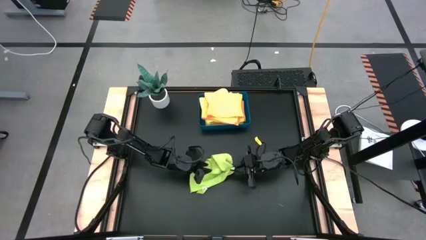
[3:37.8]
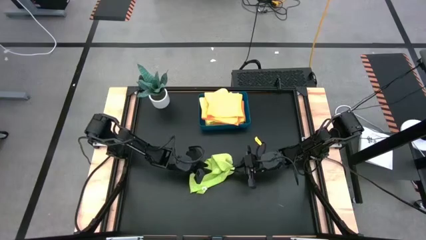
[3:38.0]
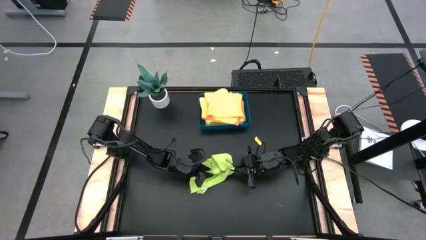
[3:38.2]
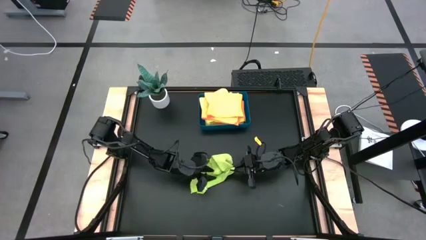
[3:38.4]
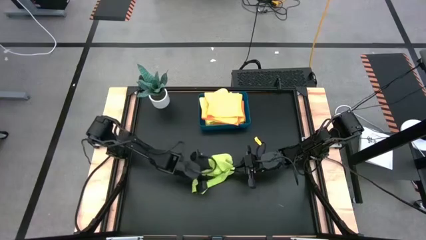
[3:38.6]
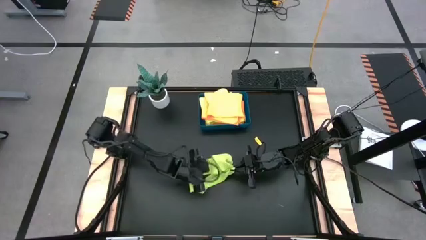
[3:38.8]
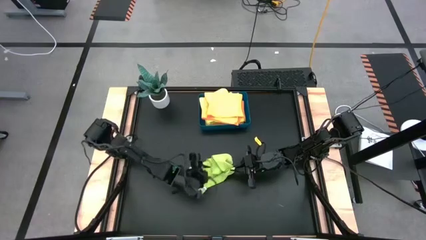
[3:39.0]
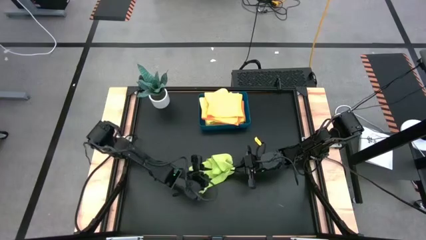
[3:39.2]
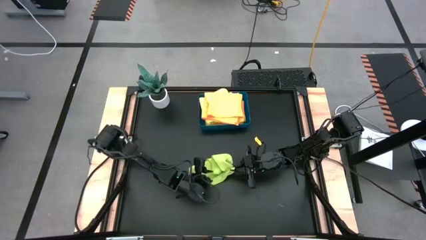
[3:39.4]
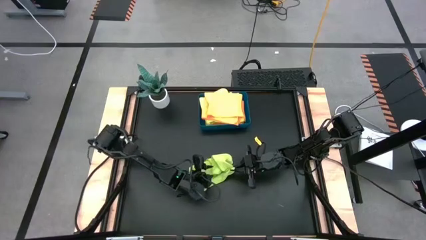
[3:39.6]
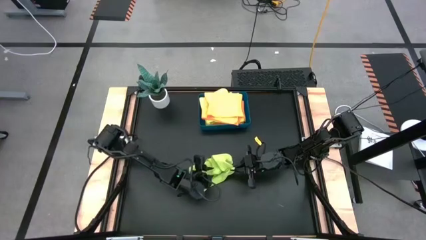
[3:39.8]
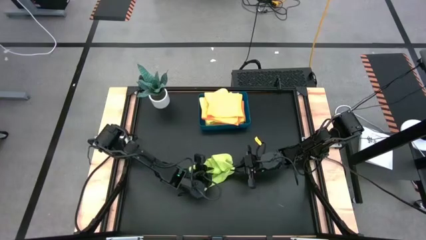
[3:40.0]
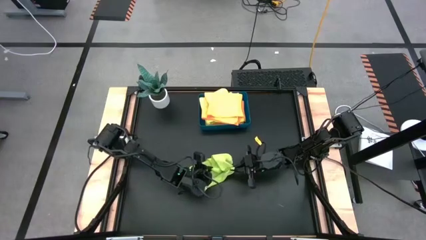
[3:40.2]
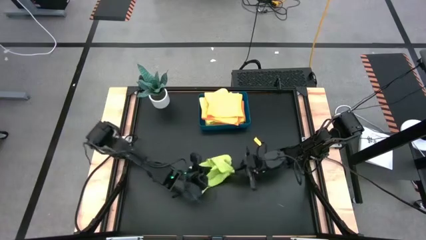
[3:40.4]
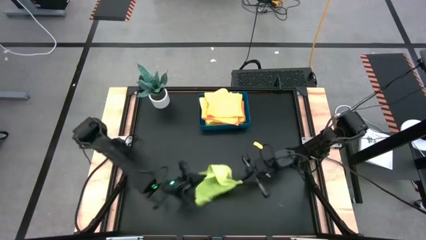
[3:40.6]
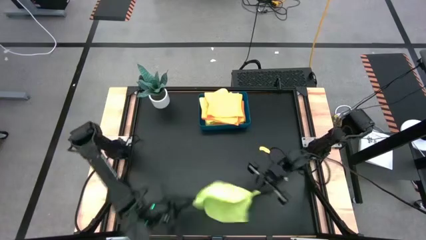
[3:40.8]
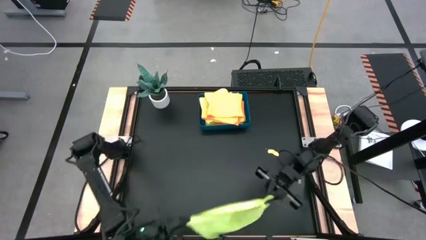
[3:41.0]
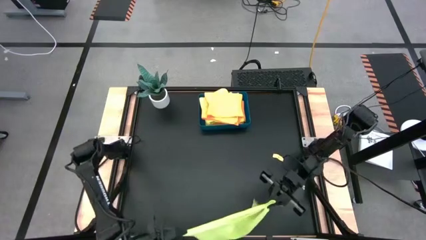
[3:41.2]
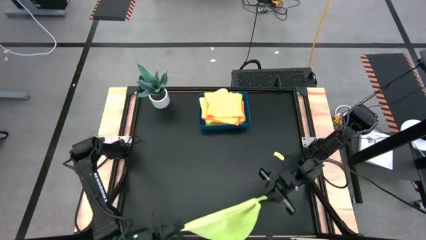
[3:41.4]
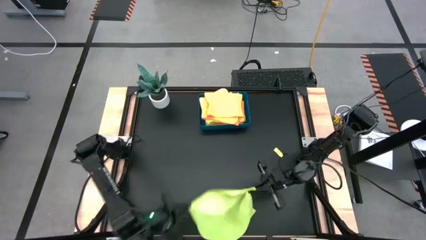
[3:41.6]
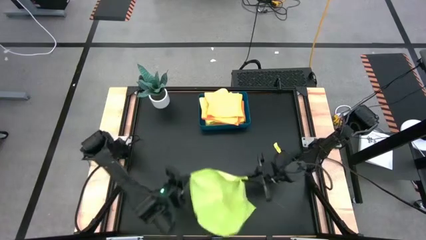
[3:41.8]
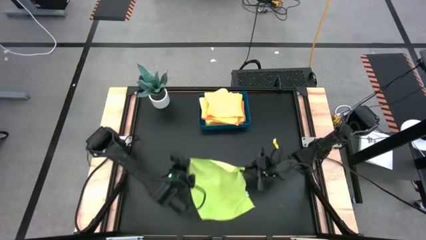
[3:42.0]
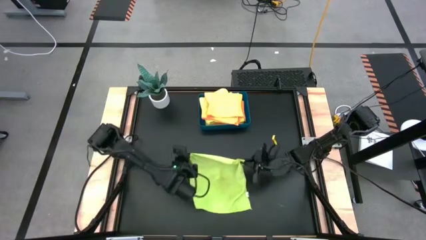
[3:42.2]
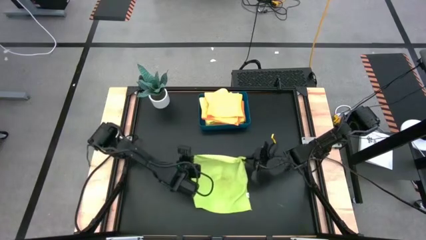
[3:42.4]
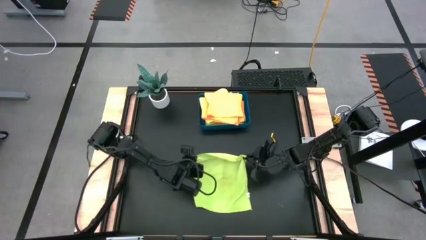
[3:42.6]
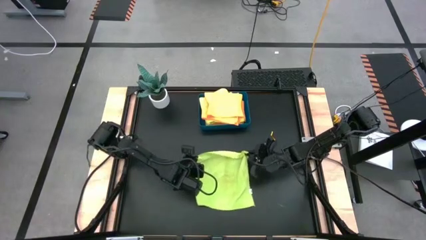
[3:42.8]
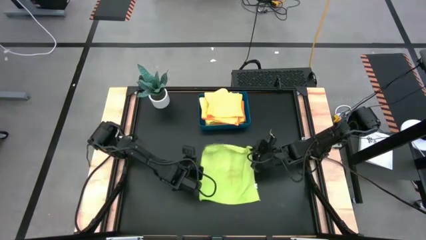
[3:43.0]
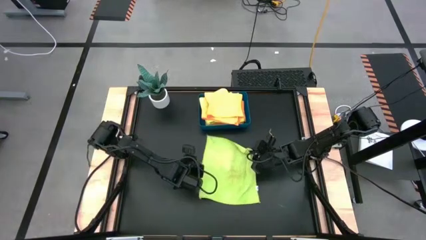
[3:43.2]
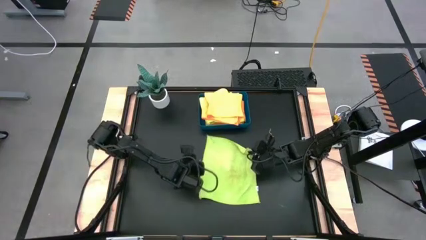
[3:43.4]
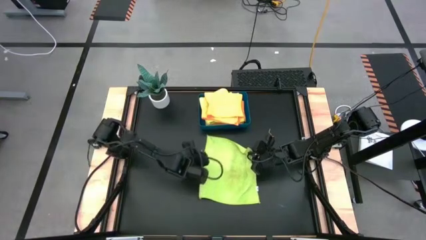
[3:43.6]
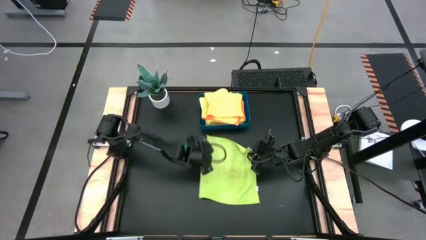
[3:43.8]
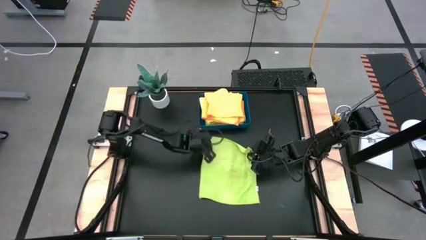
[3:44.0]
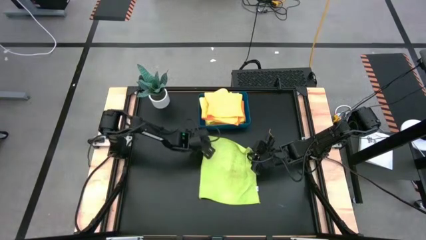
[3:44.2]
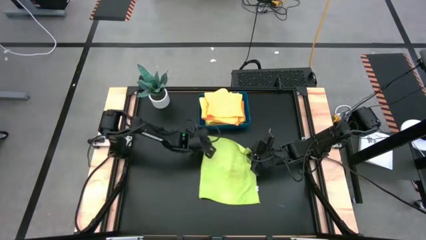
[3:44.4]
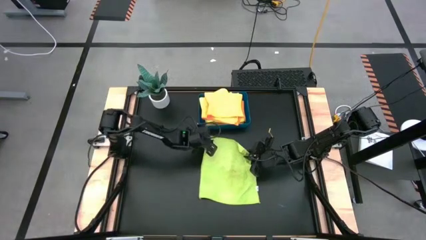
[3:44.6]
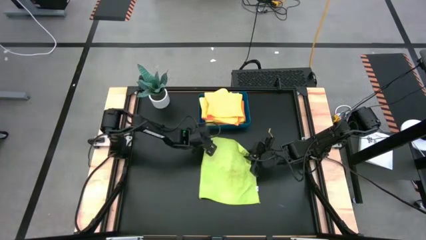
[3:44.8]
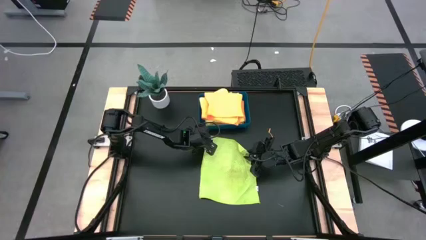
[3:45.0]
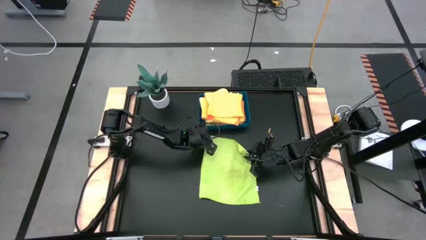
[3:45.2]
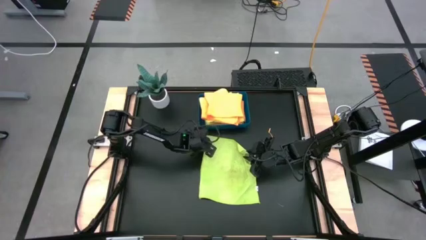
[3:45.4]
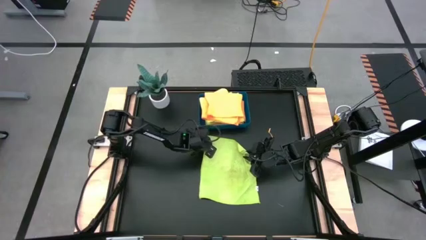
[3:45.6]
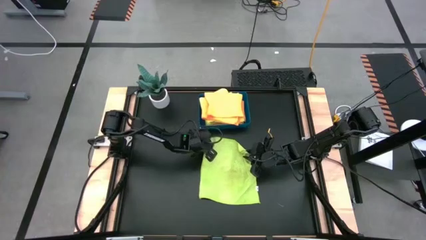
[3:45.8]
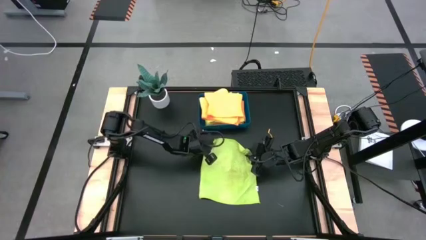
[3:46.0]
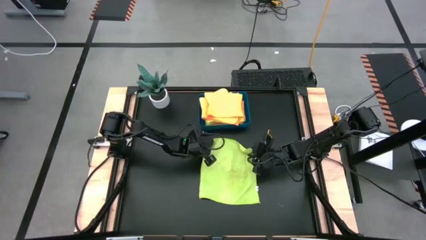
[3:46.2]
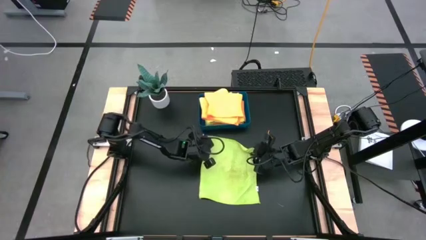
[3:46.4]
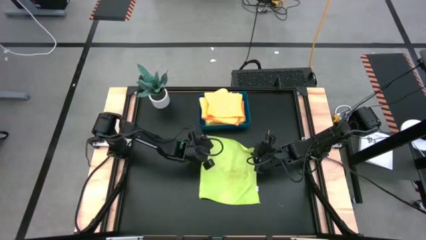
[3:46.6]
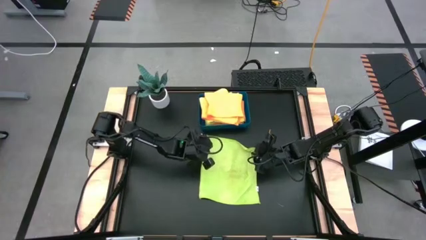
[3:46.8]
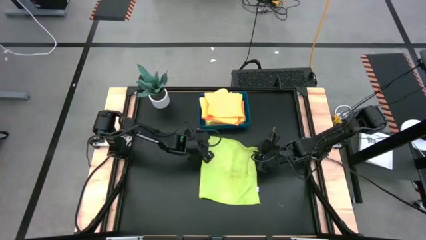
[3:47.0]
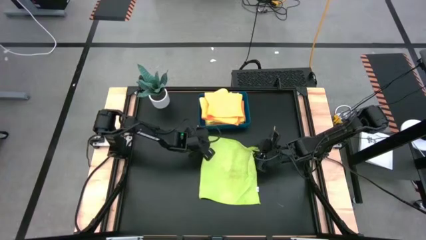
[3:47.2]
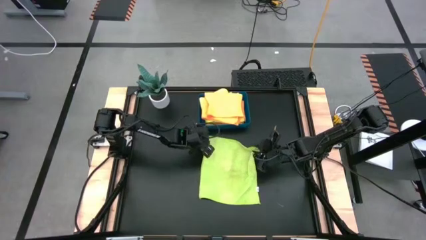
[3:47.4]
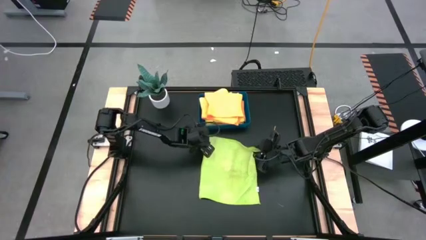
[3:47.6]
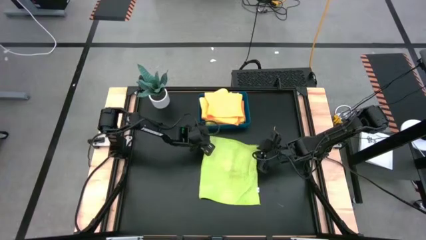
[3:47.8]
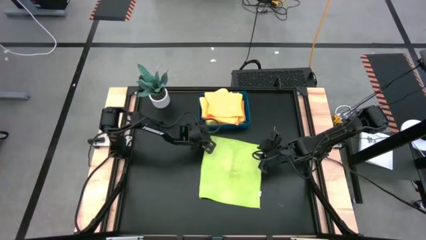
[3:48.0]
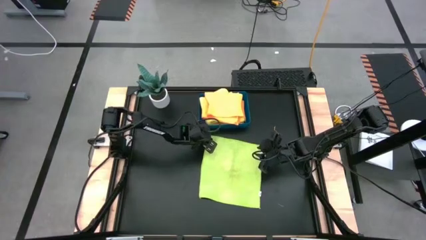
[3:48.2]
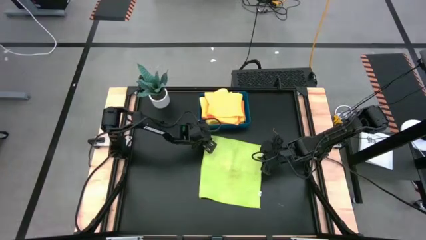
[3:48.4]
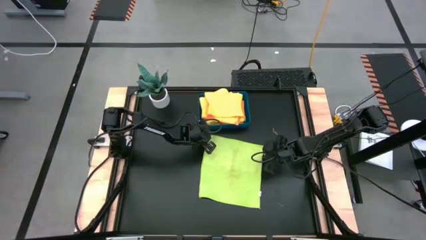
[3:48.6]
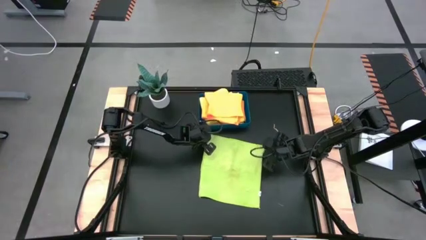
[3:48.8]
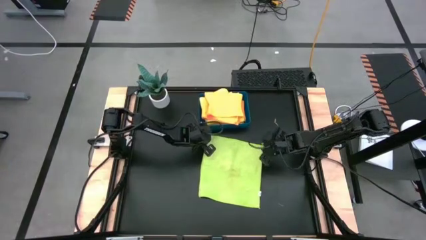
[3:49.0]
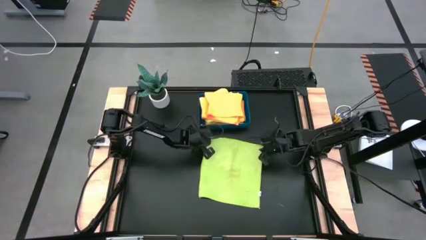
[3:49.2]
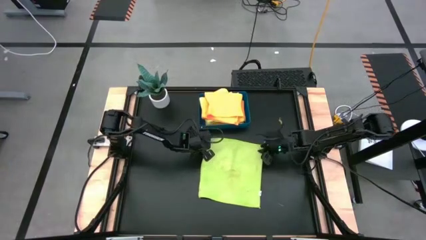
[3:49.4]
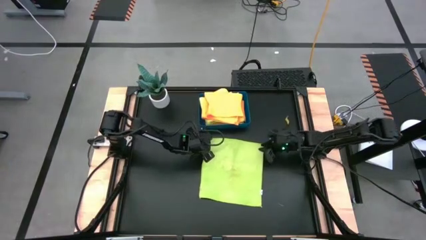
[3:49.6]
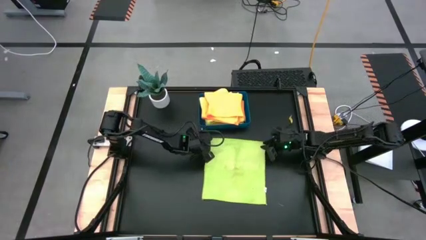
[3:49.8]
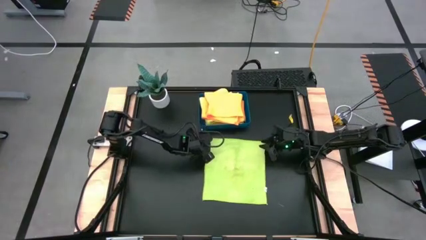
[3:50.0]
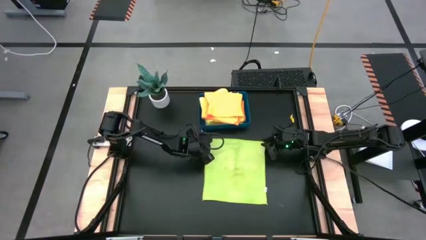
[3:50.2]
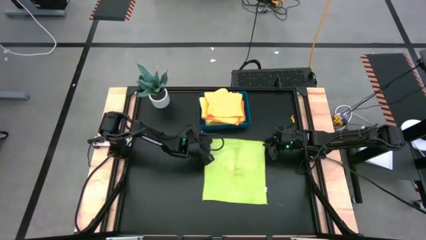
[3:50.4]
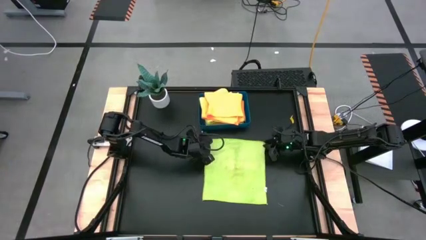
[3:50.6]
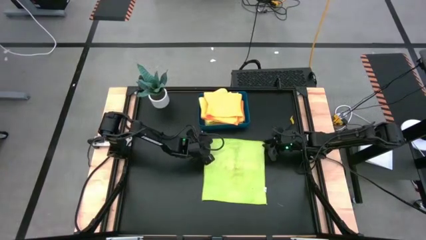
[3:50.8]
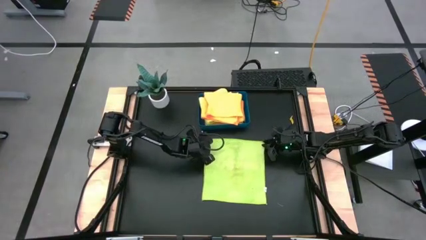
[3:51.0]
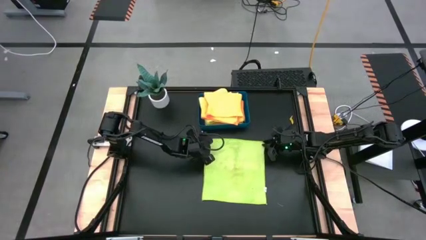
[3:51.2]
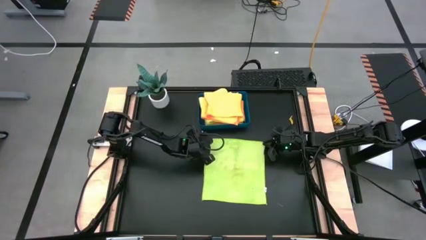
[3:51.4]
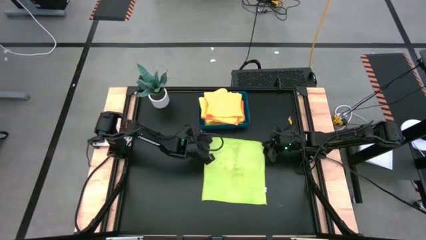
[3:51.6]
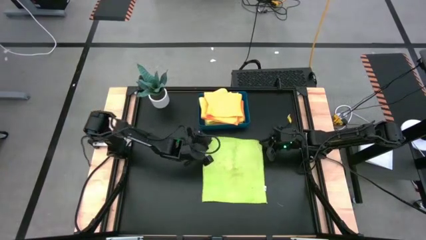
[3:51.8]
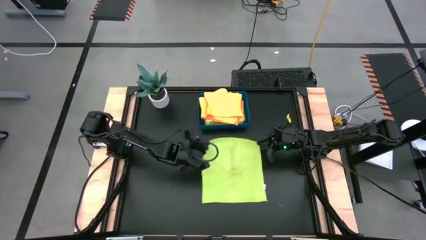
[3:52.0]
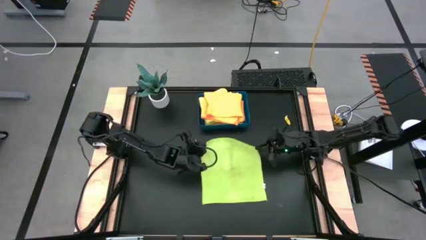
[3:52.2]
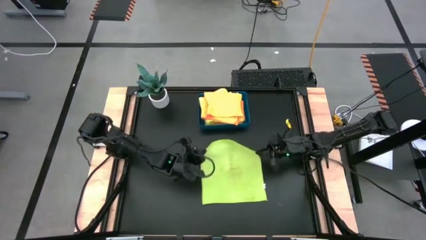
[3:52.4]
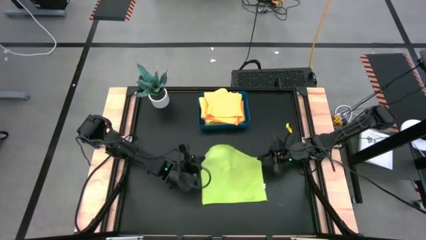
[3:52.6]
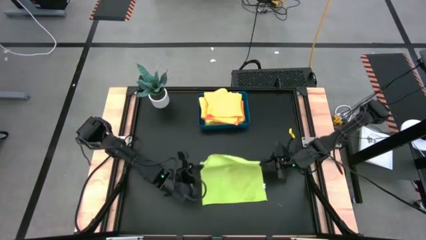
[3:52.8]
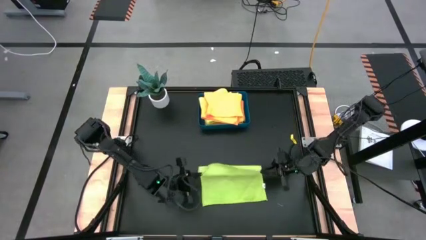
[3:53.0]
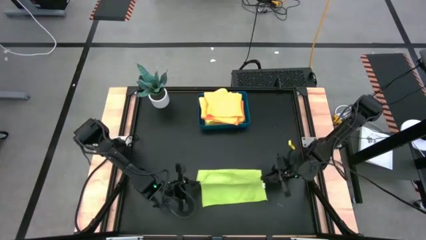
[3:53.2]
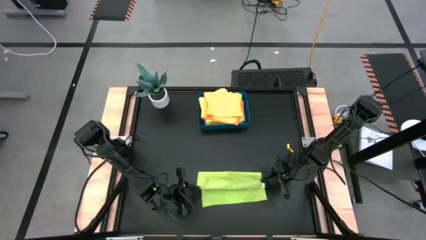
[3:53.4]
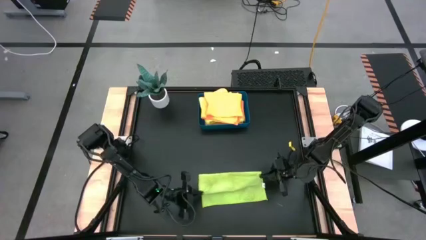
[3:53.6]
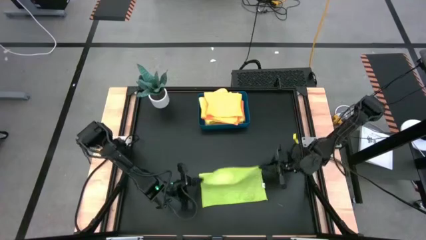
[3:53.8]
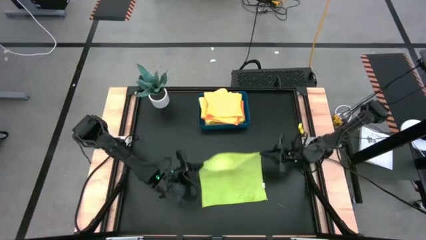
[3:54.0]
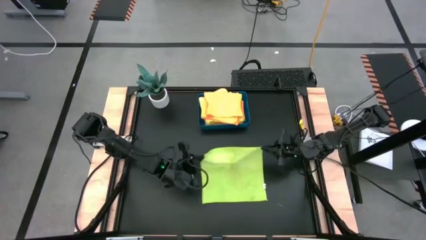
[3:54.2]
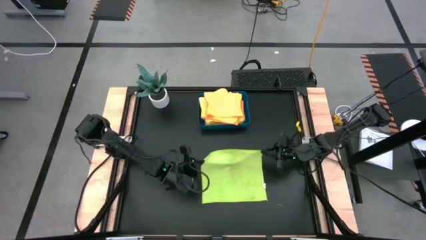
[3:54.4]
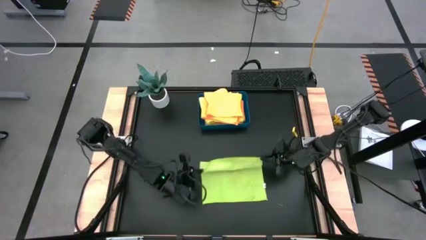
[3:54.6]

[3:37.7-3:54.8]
Task: Fold microfiber towels
Fold the green microfiber cloth
